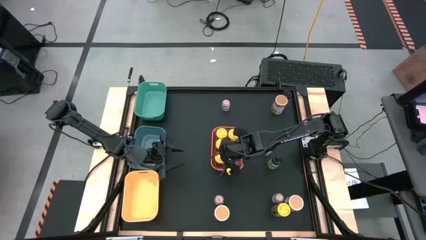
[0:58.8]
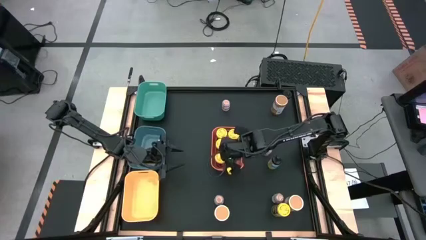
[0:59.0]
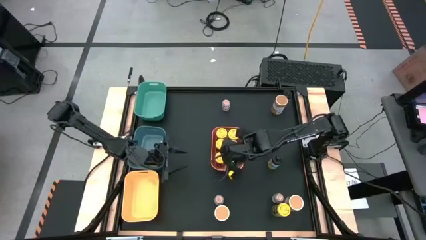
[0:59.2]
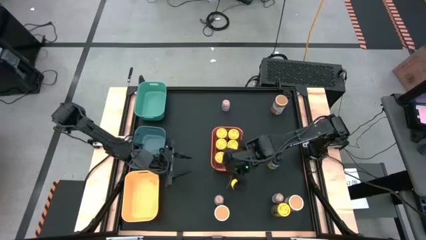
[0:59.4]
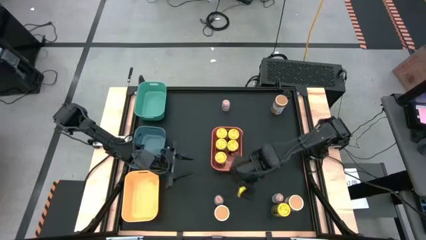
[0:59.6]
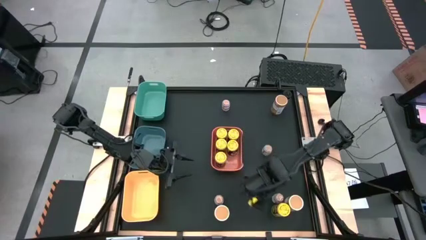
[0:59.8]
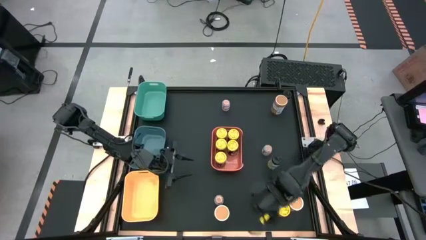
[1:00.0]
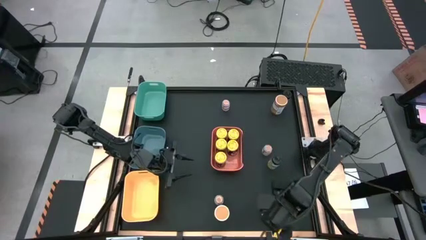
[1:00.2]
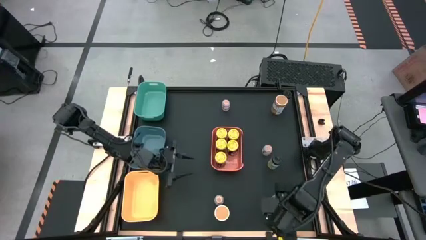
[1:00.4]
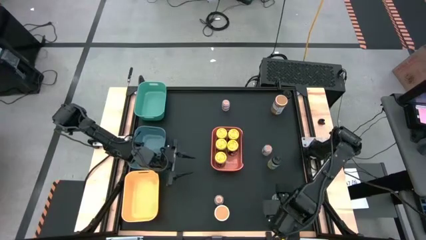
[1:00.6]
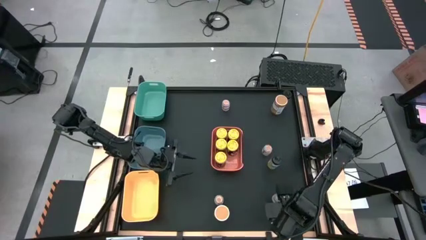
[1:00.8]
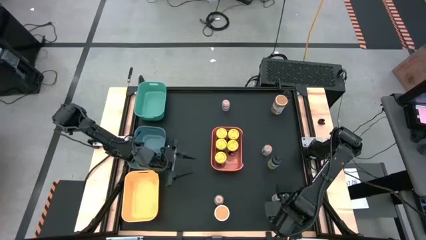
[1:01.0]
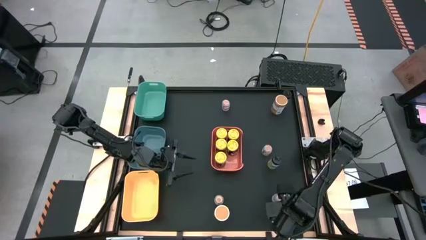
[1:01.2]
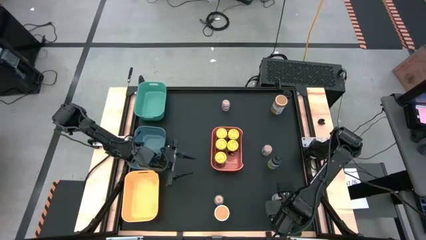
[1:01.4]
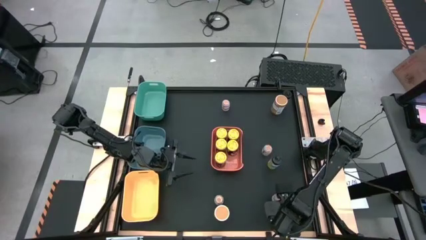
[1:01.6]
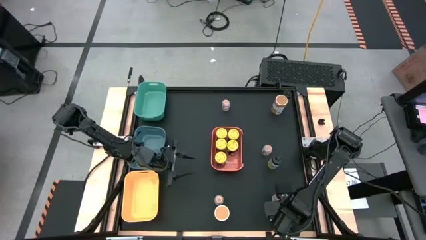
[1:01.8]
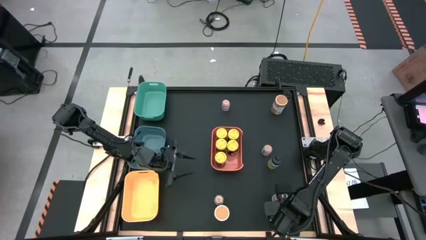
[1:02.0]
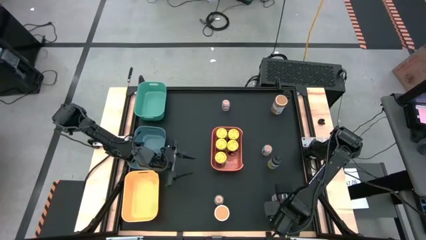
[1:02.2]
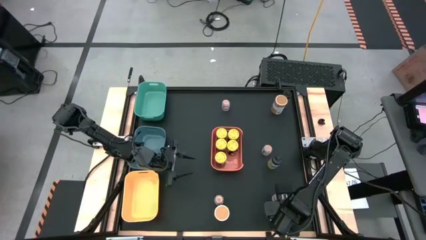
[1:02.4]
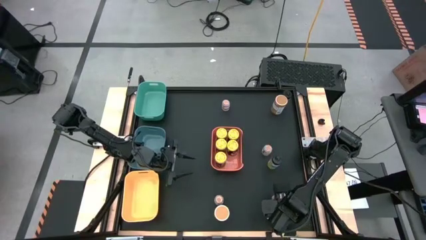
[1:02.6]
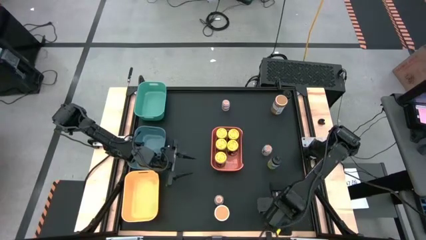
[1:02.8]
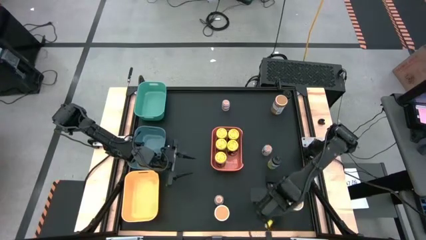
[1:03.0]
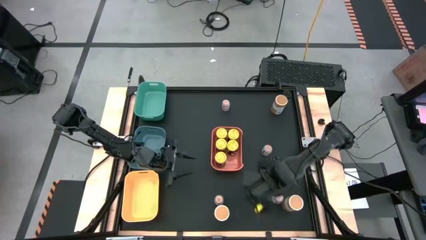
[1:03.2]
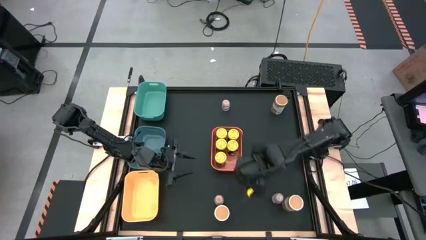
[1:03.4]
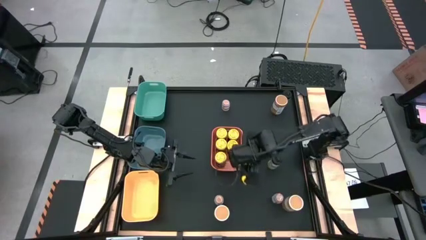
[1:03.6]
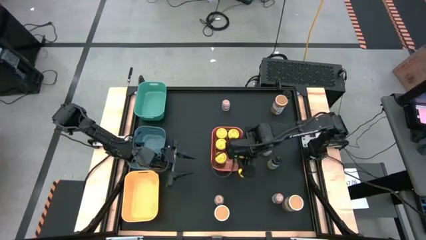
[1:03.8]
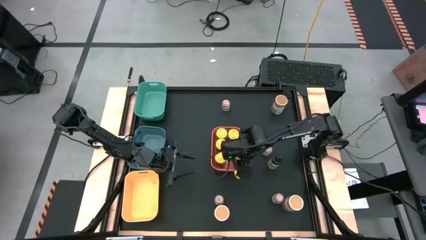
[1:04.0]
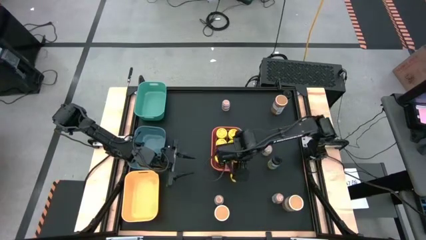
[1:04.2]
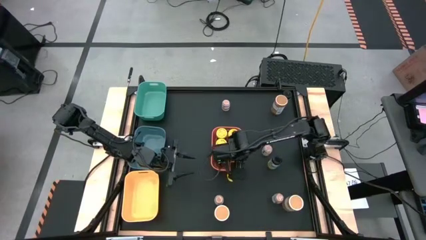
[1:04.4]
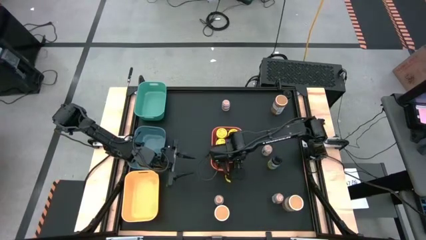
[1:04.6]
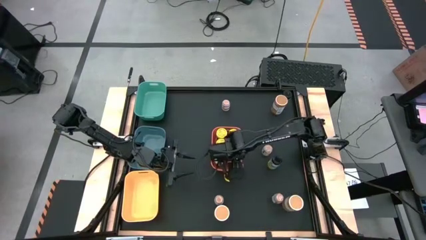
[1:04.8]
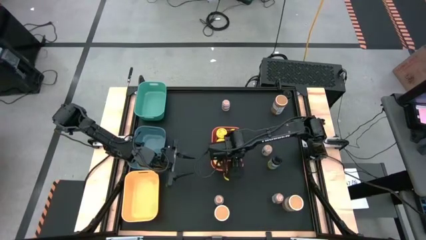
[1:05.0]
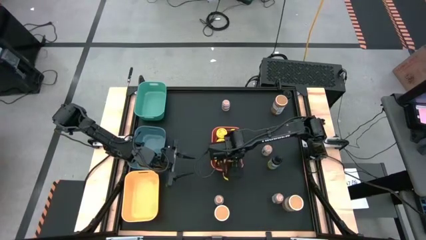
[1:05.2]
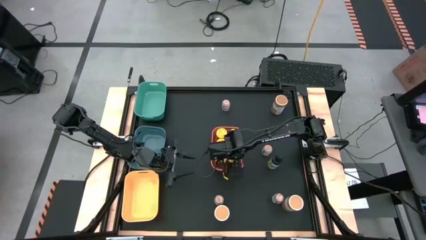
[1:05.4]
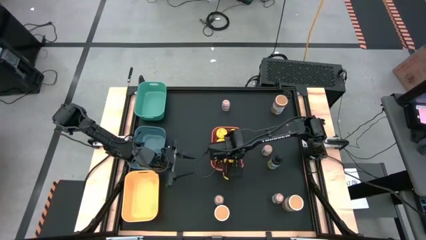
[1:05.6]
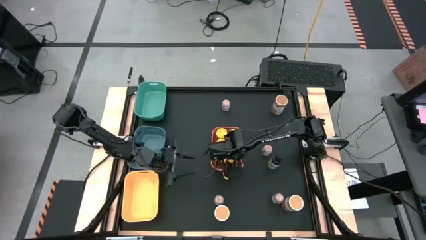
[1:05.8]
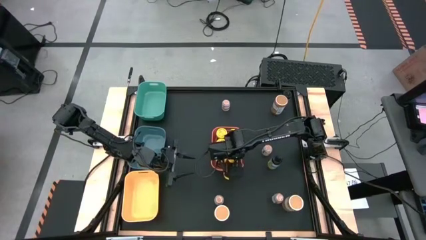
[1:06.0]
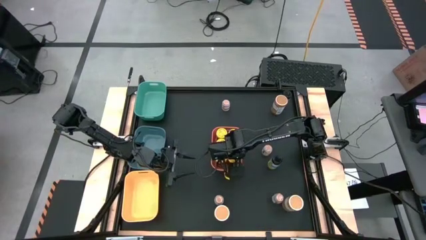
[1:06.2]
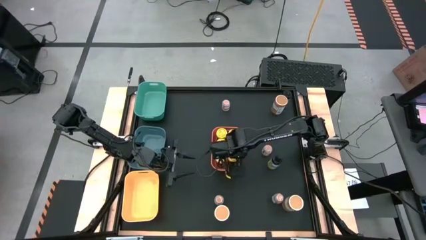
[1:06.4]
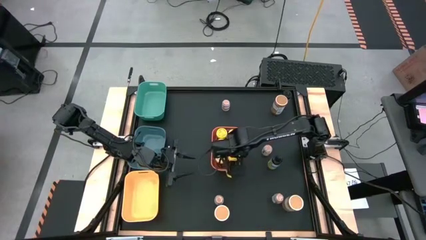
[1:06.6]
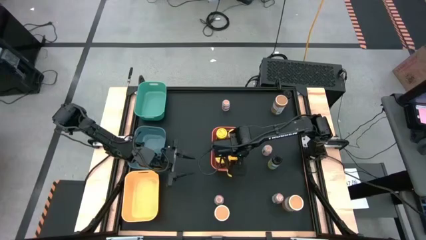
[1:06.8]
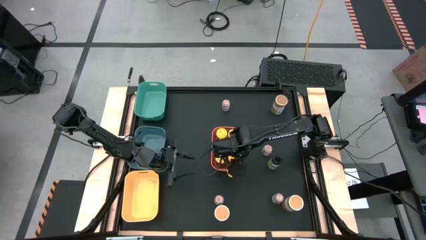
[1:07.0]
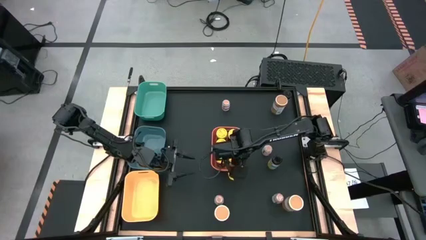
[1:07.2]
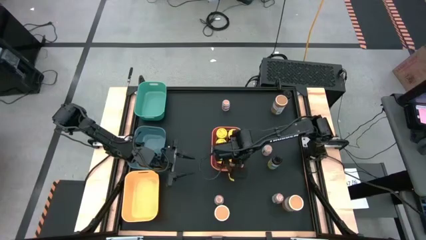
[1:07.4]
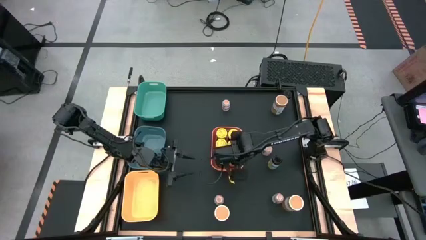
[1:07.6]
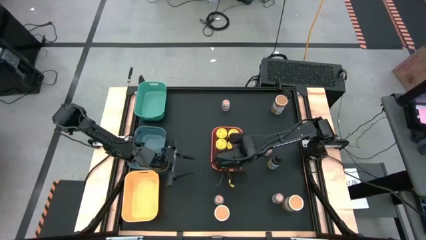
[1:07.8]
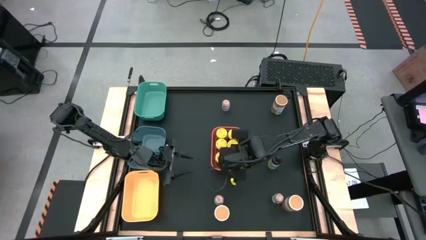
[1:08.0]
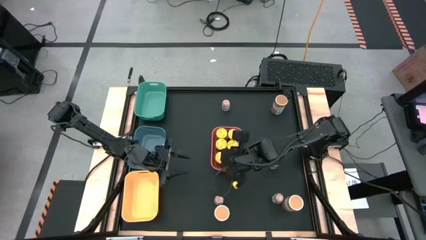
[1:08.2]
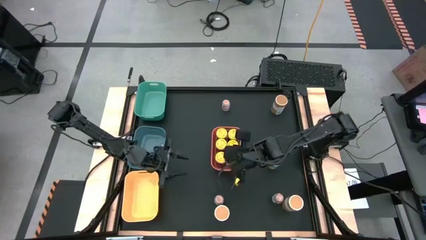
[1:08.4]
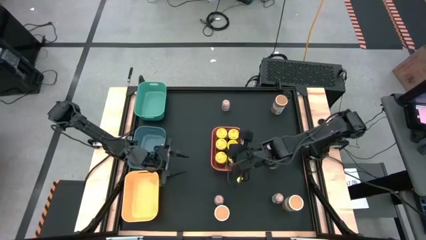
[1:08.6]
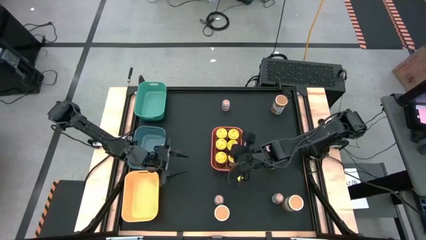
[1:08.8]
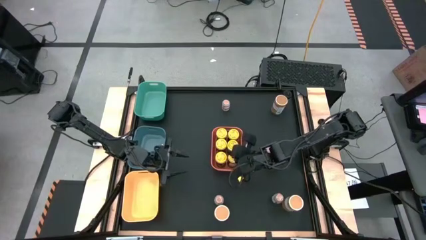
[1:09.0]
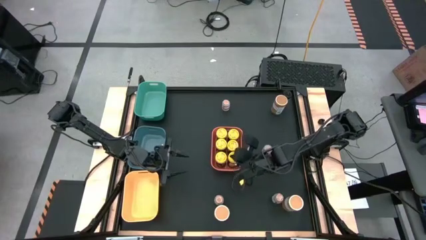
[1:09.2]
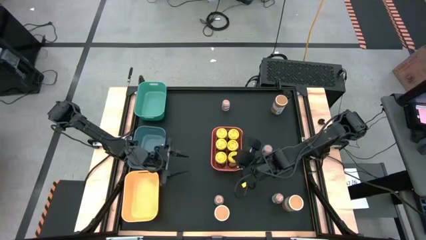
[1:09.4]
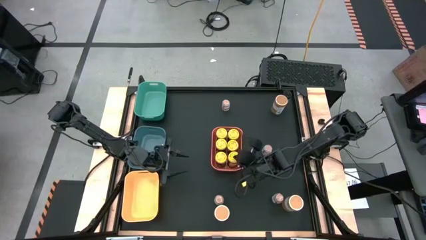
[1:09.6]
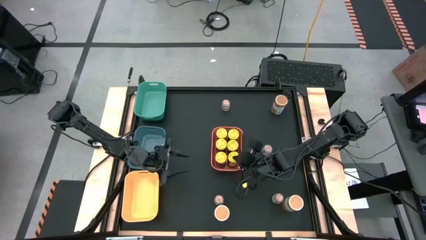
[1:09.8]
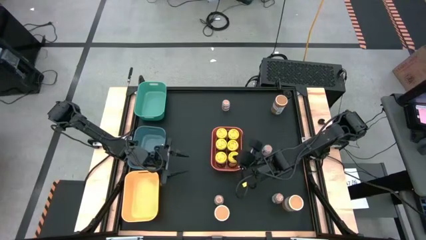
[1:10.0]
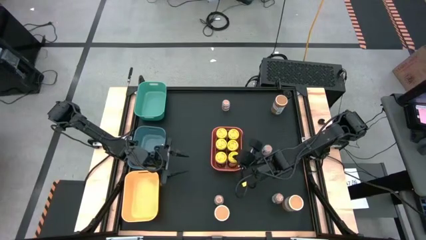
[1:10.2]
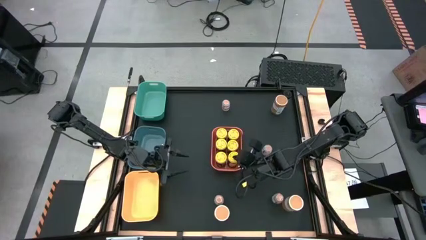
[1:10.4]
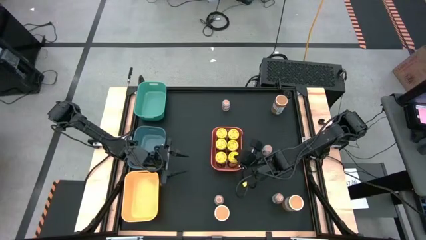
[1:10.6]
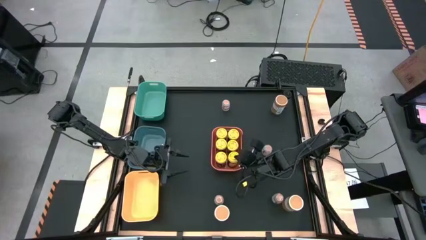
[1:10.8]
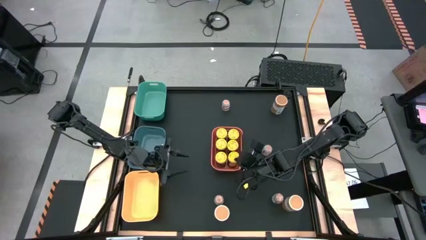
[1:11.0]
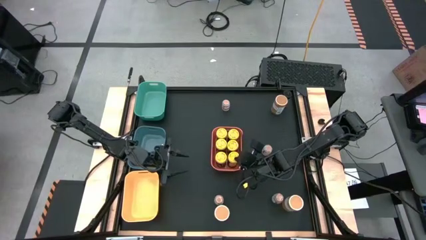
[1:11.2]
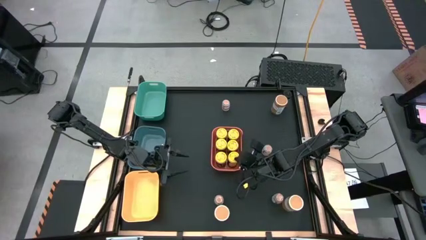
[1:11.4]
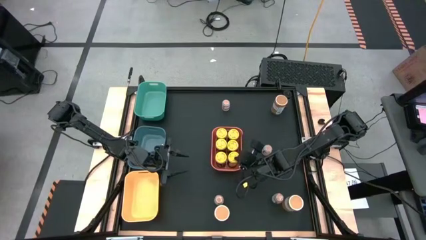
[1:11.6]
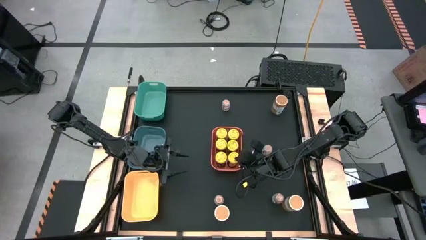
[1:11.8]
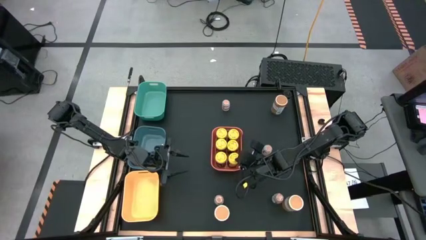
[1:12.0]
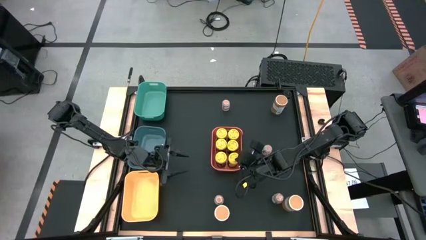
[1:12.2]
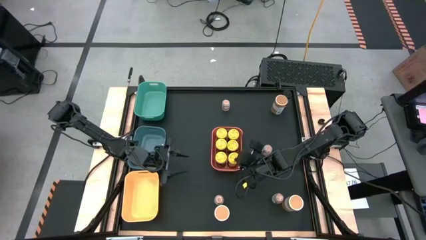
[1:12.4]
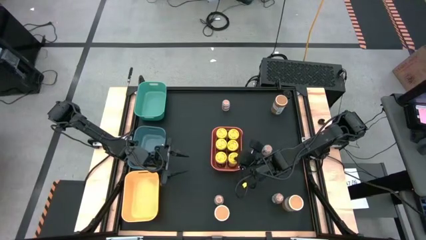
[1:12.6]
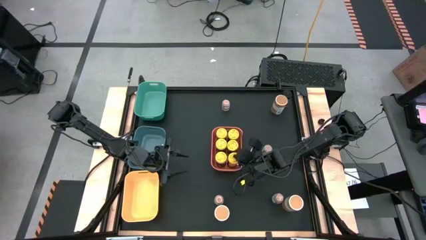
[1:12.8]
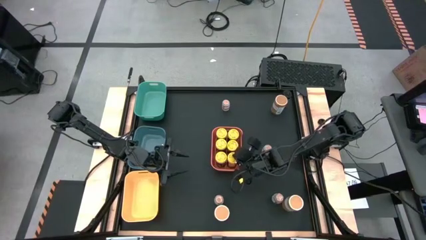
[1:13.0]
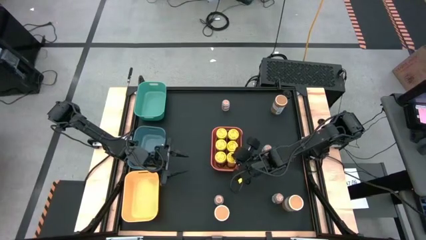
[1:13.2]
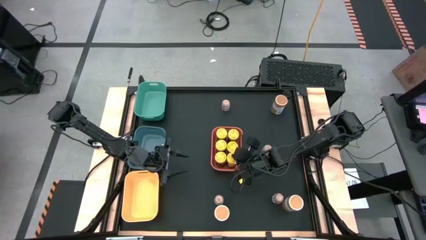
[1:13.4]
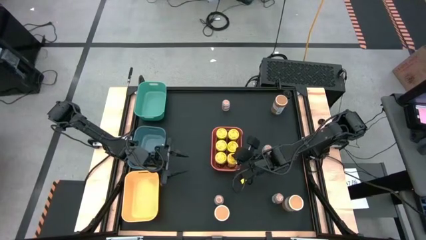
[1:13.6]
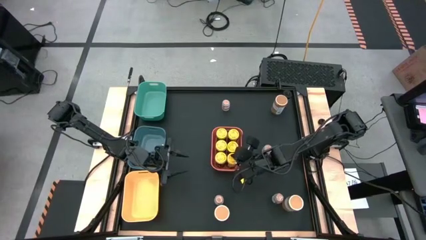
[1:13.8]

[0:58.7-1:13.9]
Task: Sort spices by type
Put the yellow seasoning bottle in the orange bin
